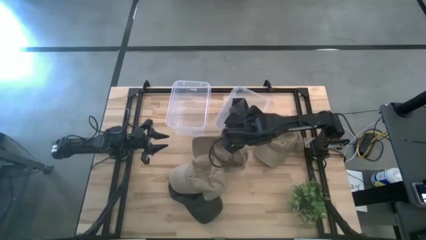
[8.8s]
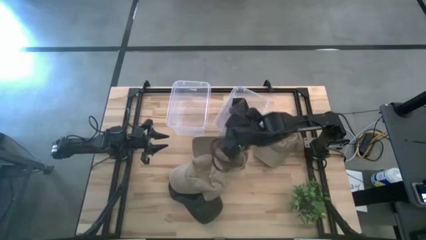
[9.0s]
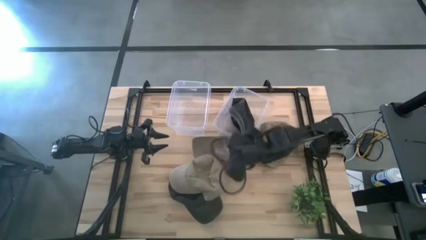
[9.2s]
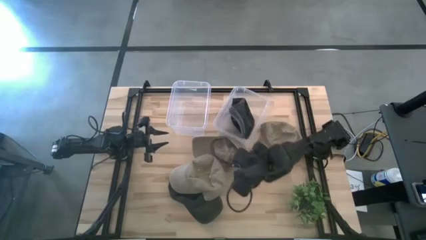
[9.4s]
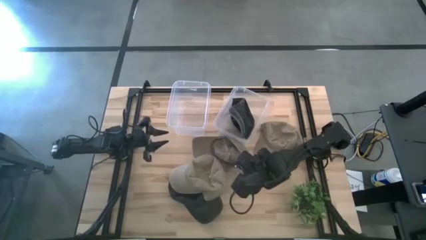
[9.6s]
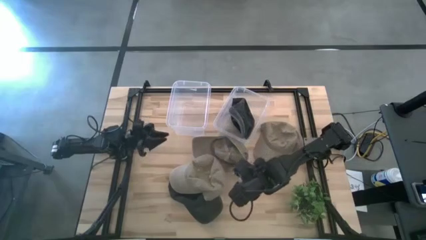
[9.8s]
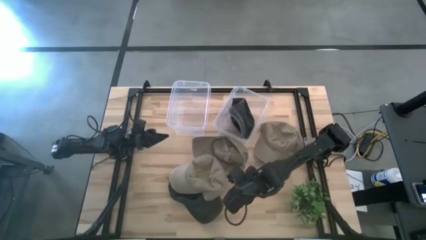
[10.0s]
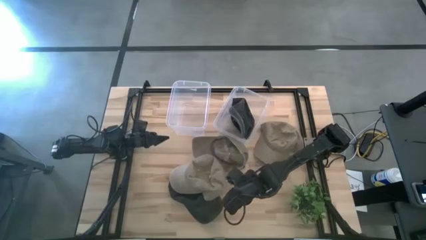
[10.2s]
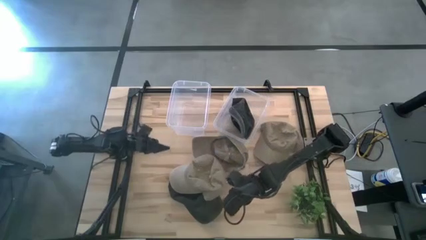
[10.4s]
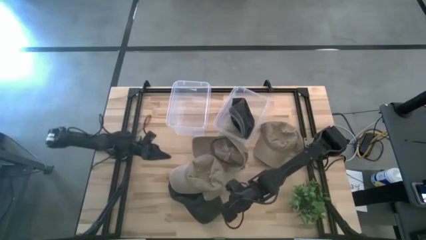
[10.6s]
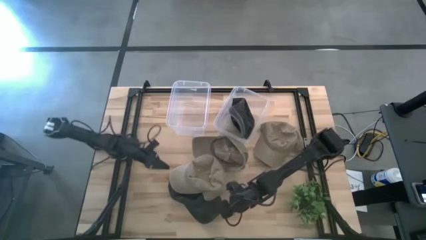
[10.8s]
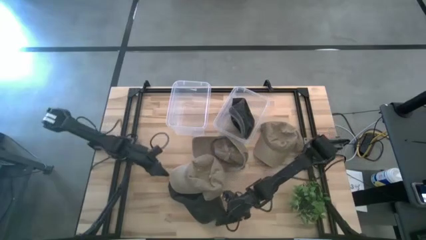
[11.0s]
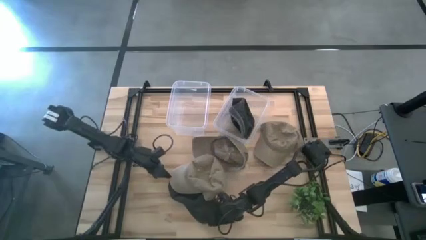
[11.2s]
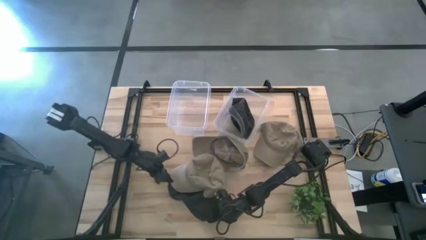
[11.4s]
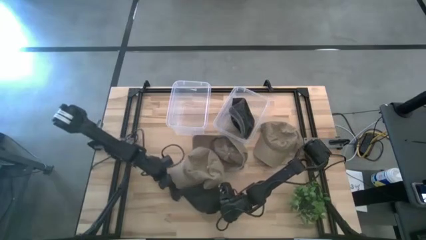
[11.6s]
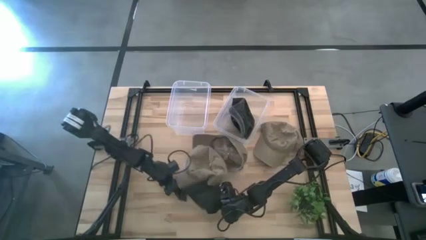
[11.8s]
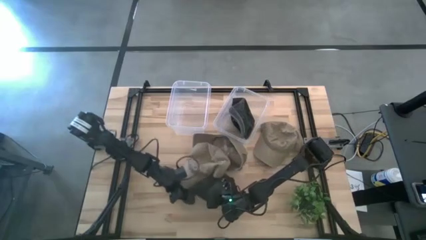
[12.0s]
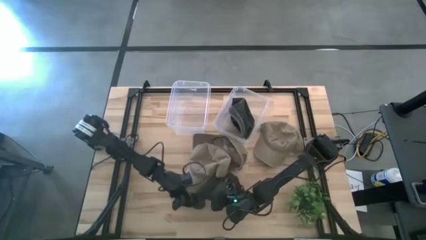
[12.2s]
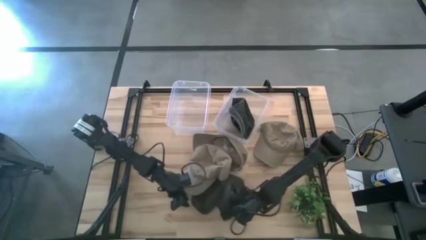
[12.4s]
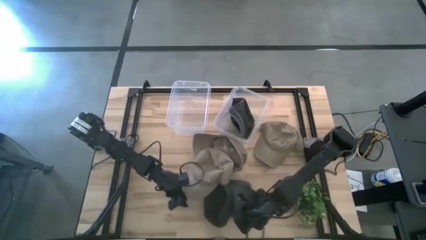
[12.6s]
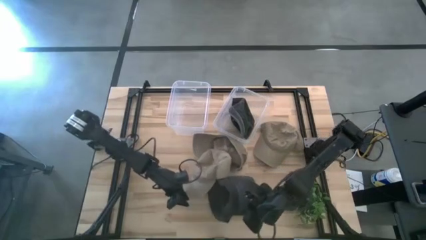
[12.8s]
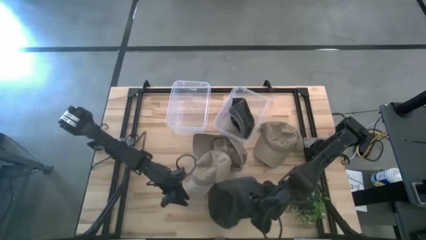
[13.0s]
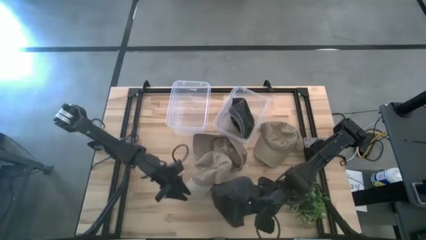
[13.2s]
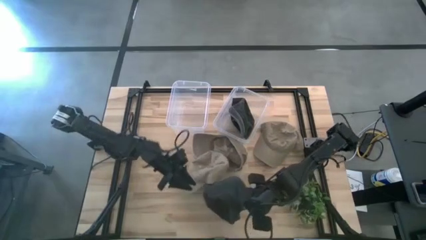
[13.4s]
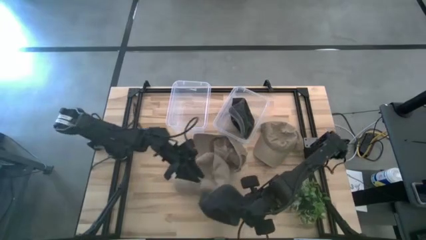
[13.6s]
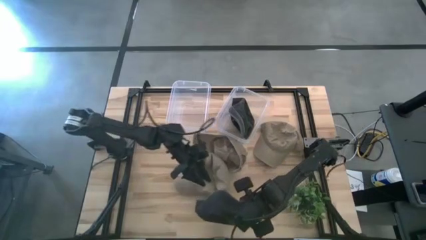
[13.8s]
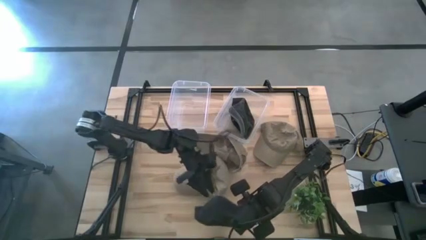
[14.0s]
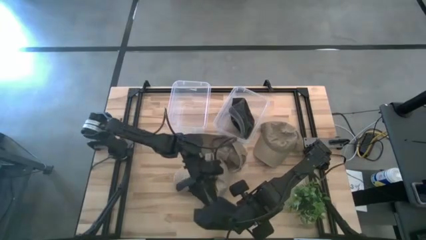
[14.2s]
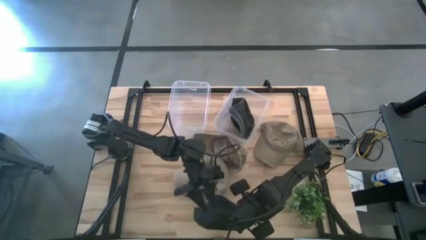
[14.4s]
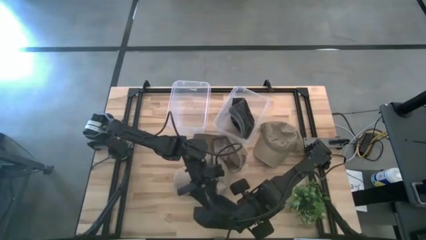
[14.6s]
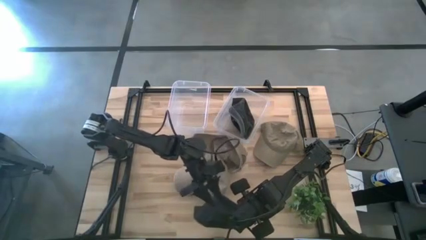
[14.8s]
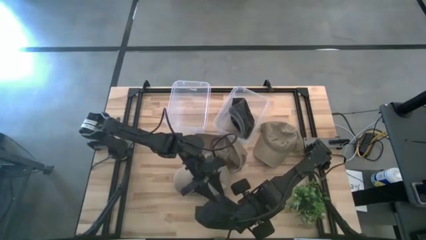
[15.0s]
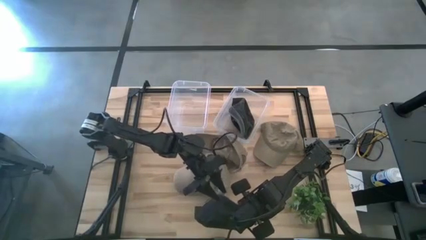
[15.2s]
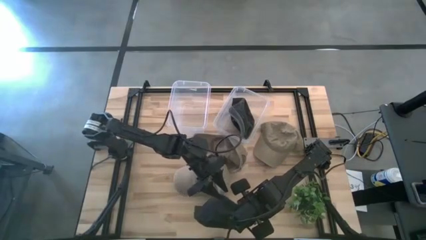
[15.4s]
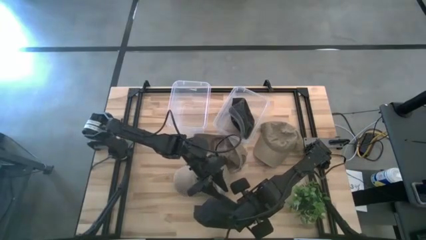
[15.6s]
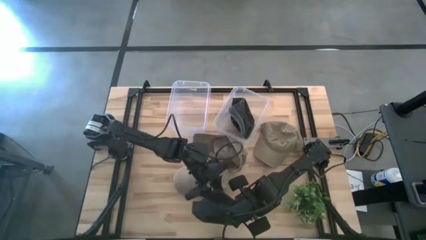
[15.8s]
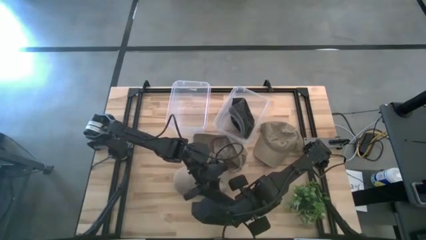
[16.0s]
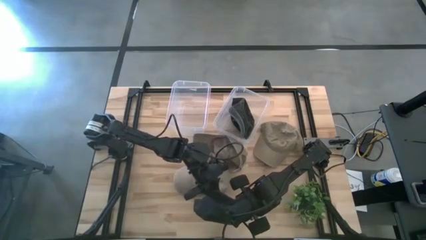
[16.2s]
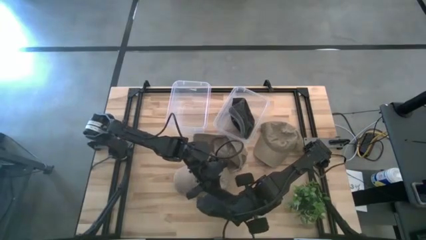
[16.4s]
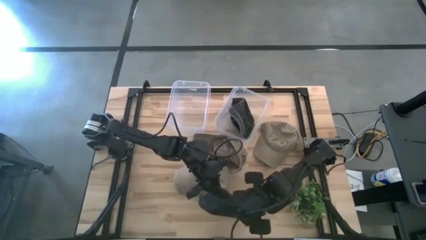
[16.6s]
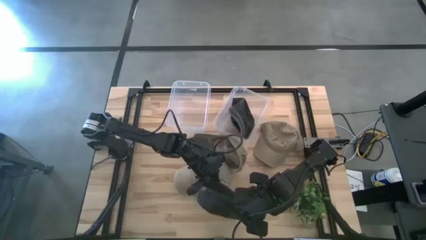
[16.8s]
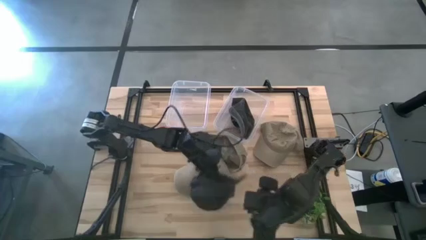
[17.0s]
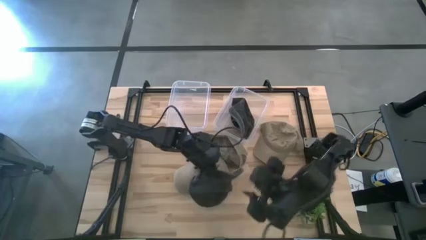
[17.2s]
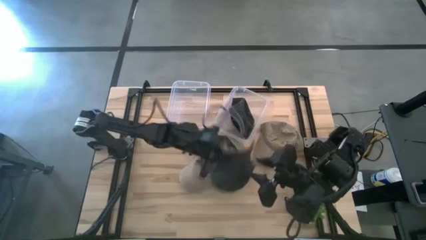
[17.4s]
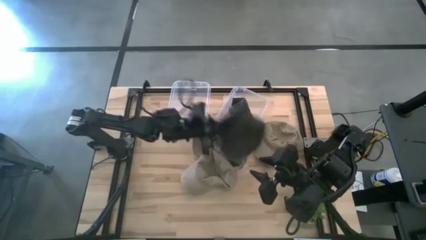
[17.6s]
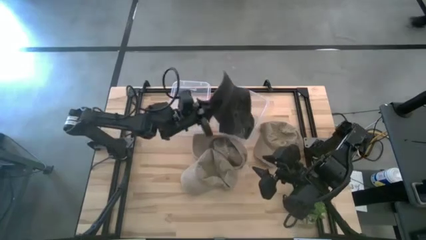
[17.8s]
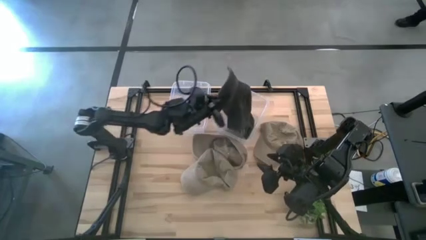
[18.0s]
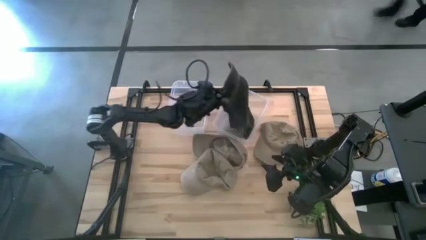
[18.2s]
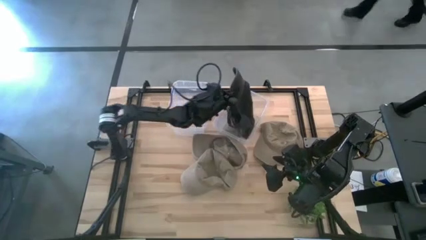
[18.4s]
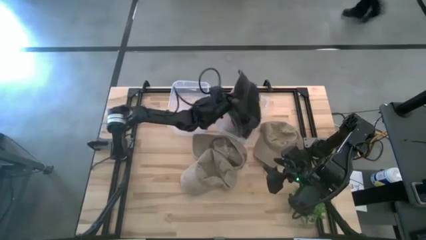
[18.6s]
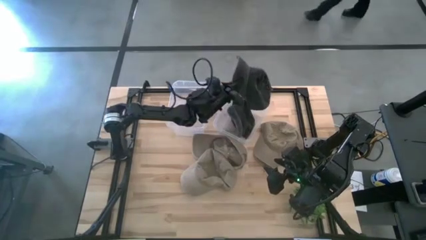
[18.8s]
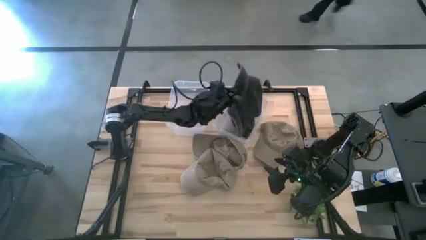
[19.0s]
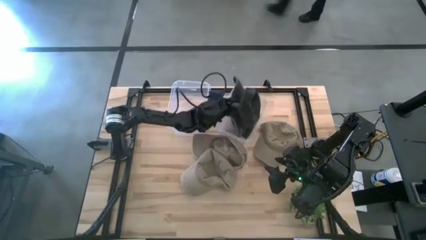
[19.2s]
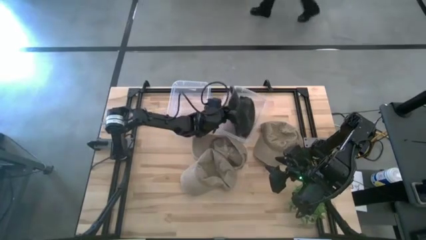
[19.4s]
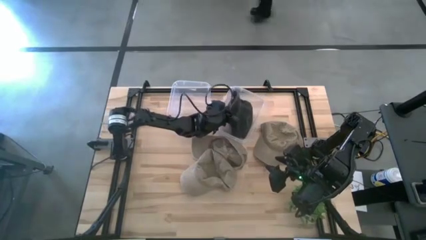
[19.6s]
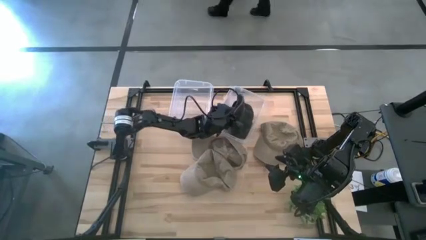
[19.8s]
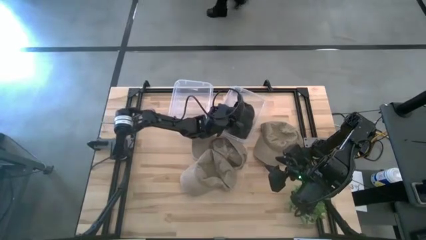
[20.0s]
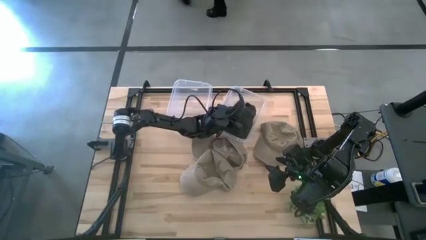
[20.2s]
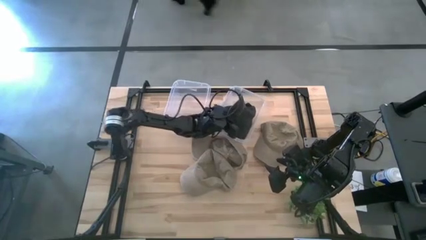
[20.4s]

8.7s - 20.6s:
Task: Pick & Place hat
Put the black cap into the right transparent bin
